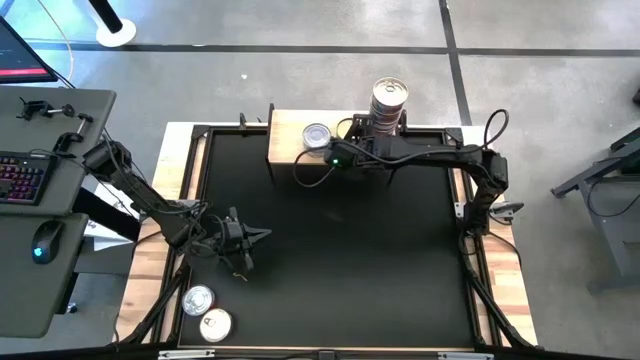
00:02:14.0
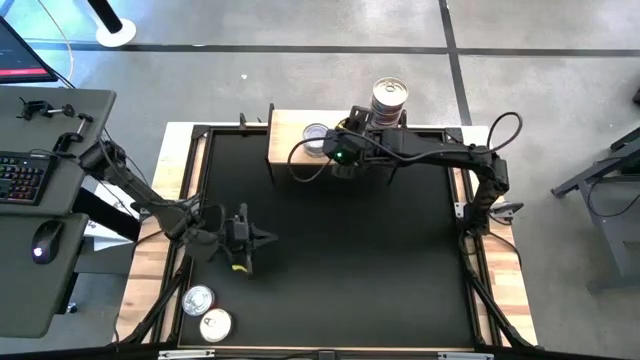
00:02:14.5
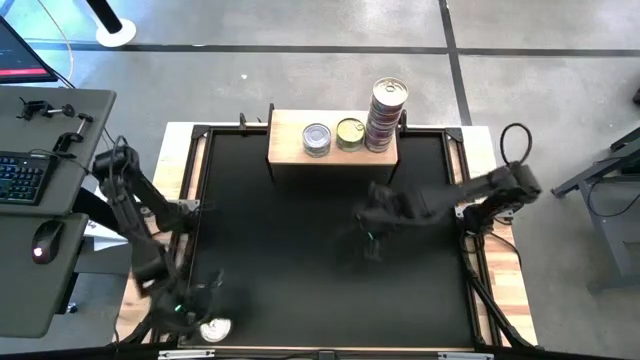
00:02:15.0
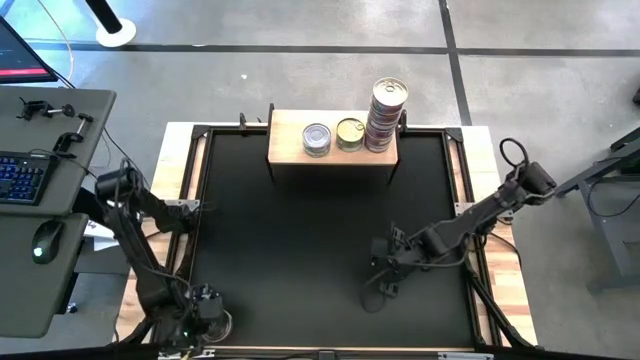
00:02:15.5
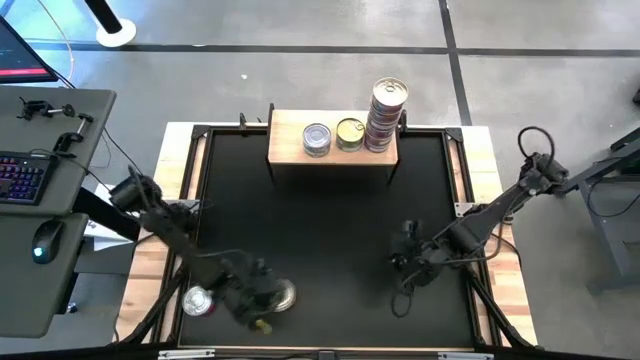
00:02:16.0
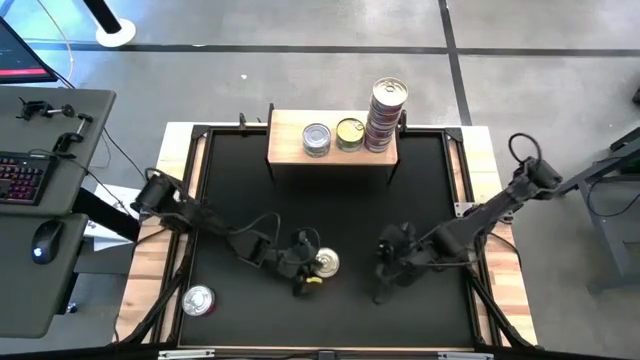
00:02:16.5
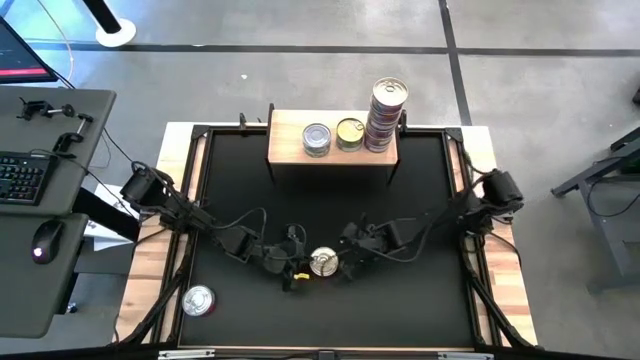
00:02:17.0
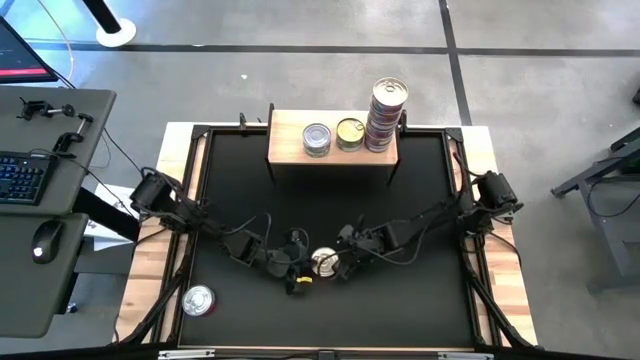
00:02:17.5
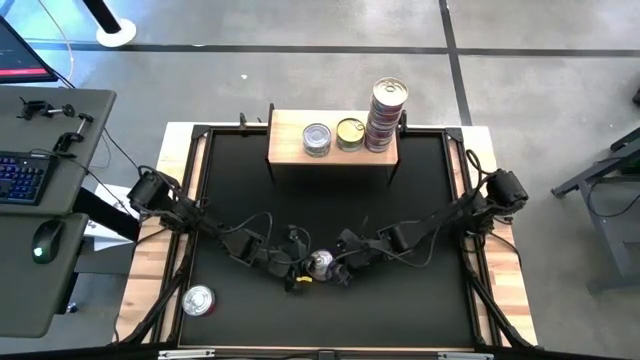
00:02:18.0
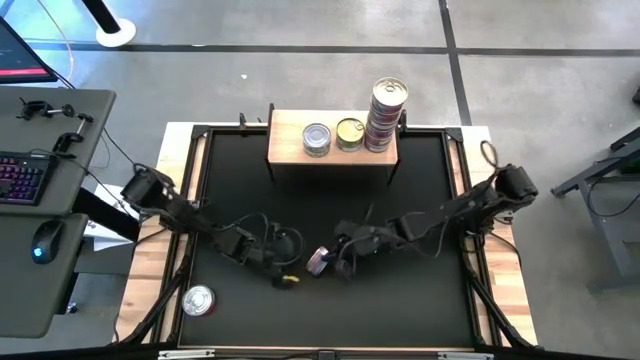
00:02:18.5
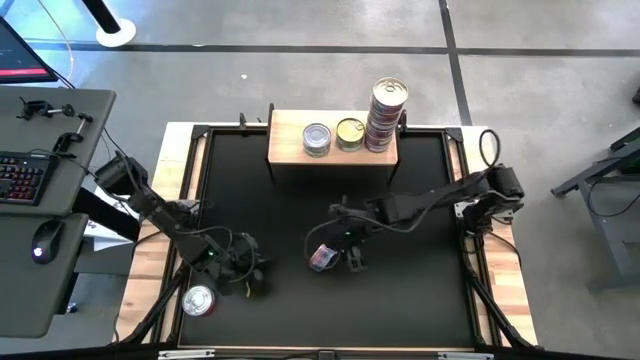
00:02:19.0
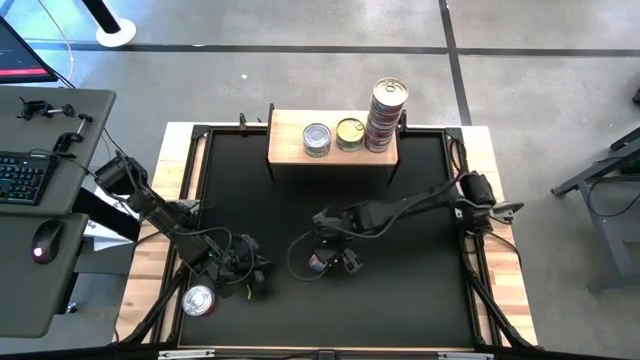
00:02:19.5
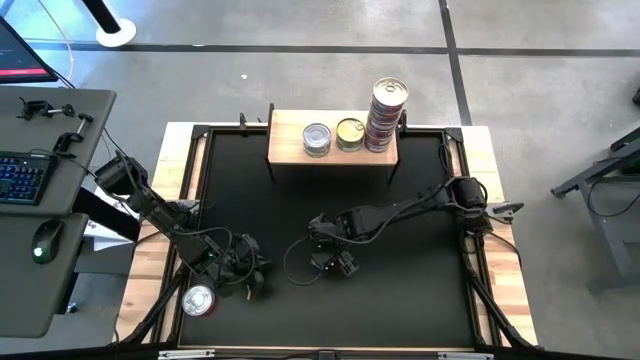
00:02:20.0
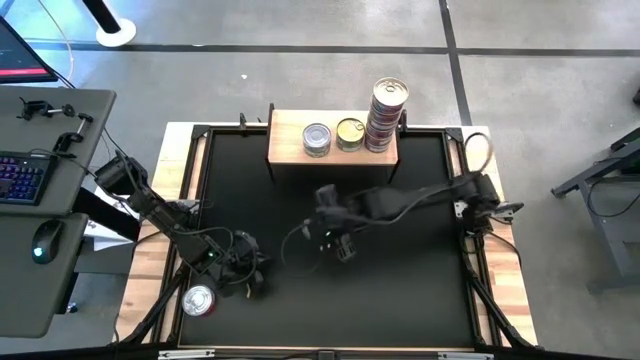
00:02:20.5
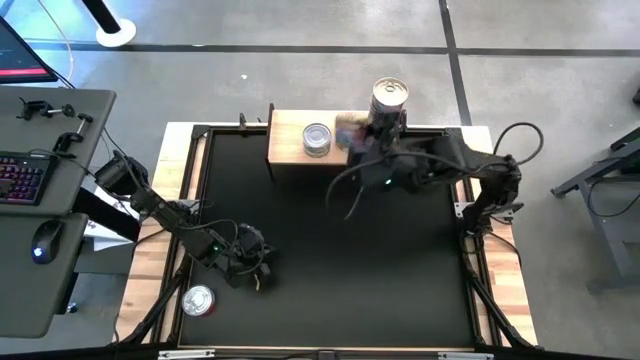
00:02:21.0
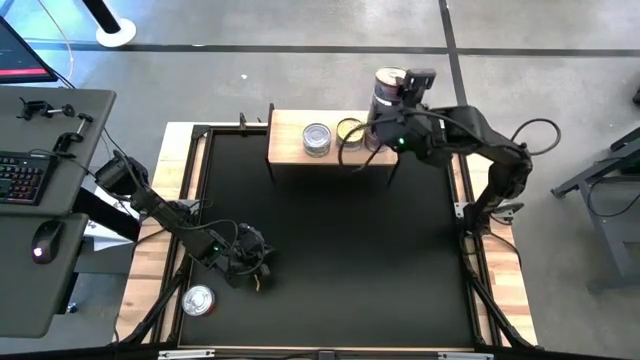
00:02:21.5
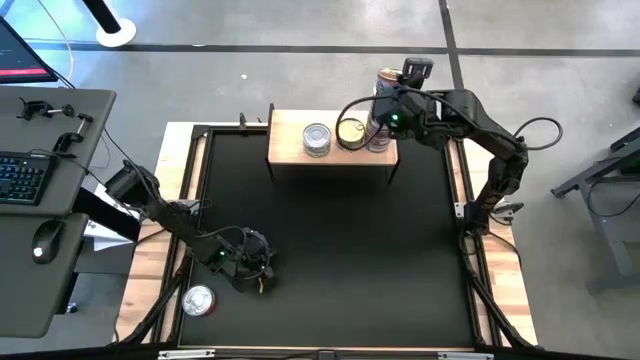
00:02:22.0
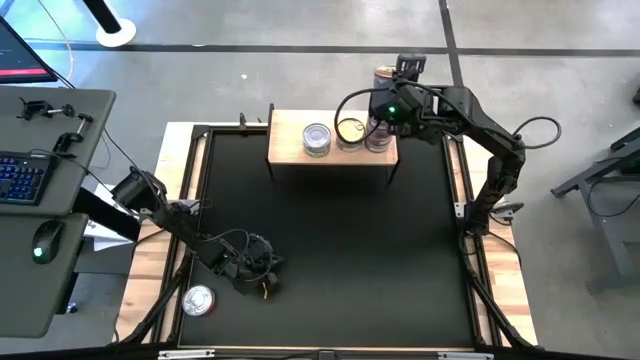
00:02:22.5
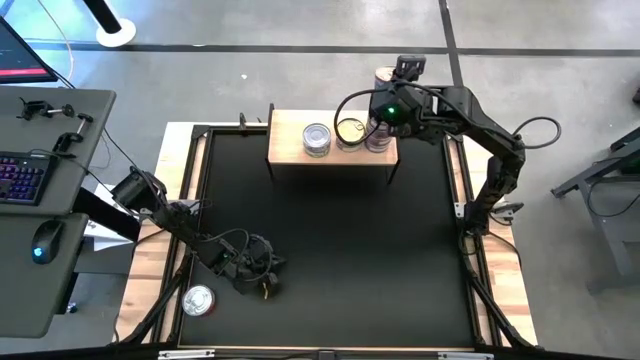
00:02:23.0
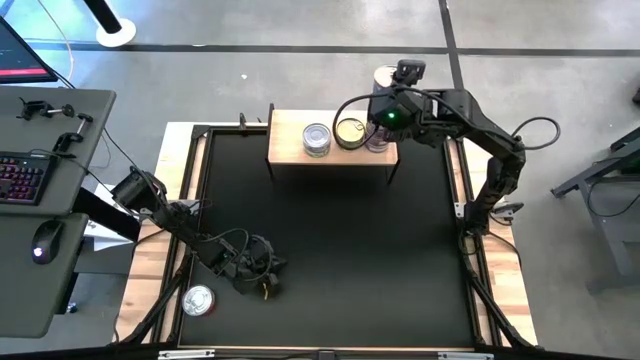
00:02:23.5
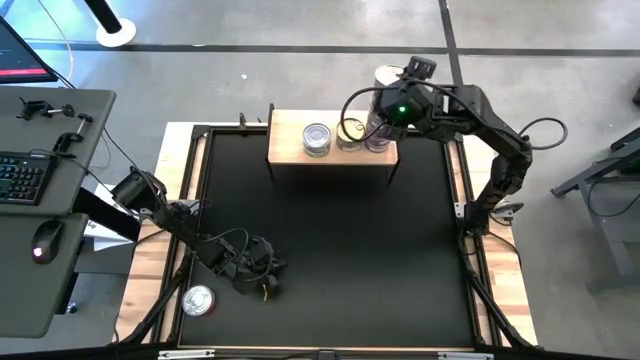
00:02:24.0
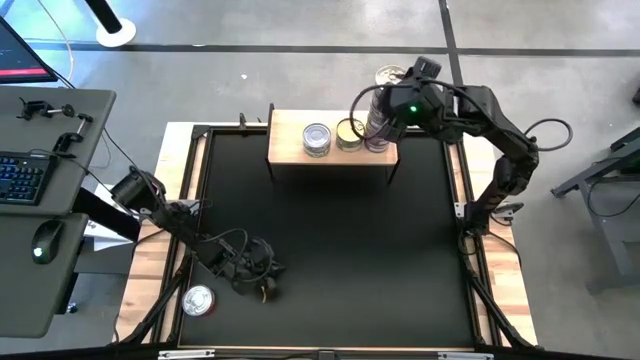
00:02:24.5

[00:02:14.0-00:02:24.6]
Task: Stack canned seafood by type on shelf
Stack the blue tuna can on top of the blue tuna can

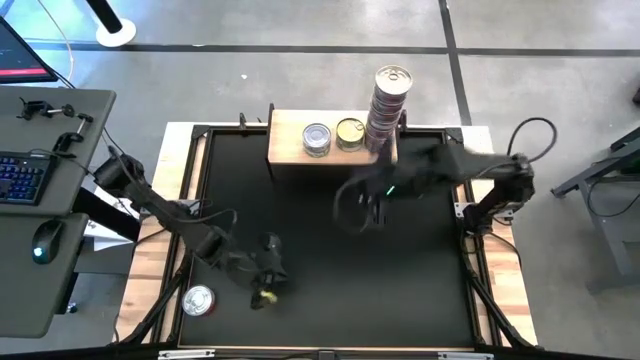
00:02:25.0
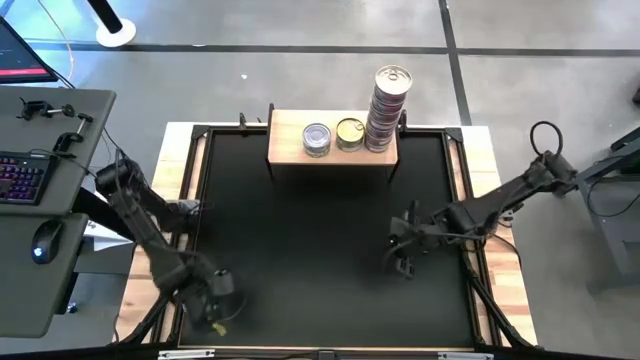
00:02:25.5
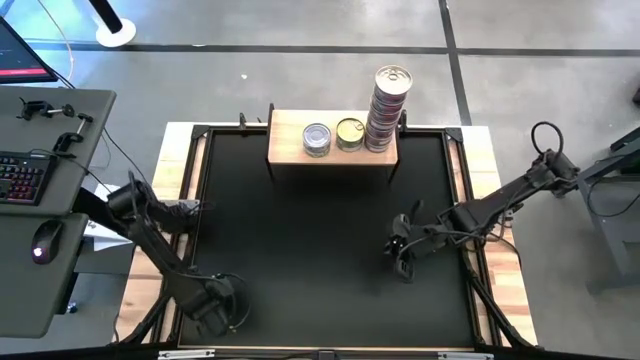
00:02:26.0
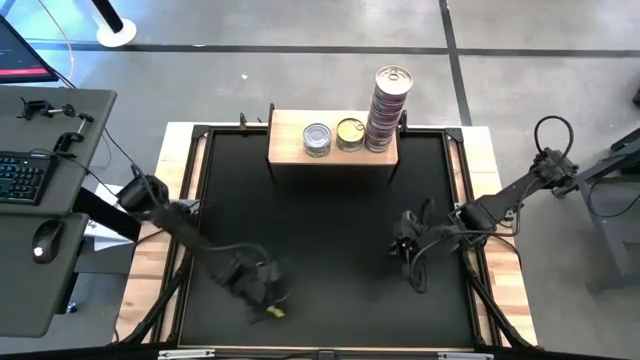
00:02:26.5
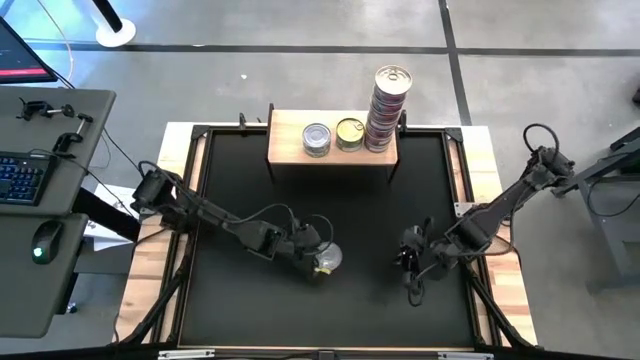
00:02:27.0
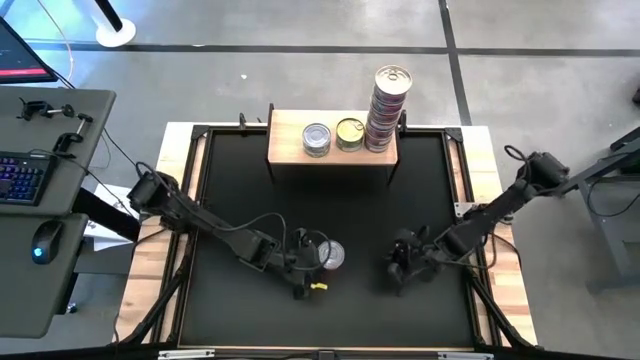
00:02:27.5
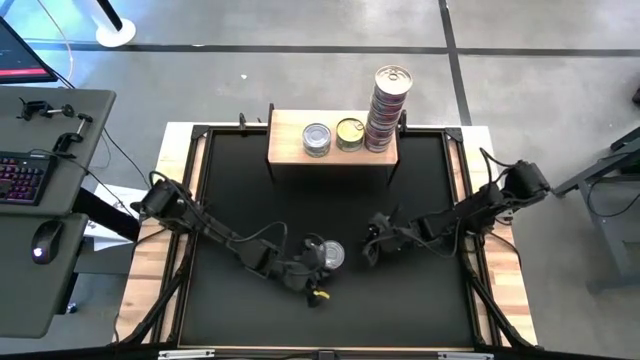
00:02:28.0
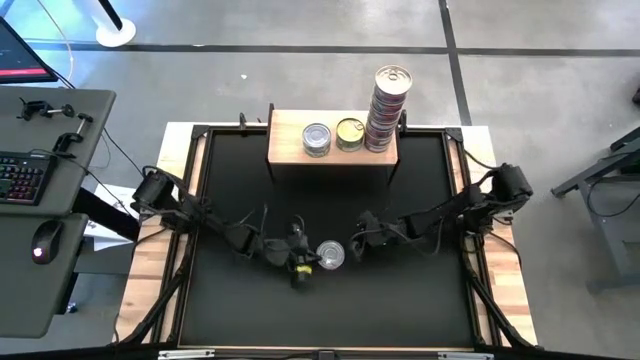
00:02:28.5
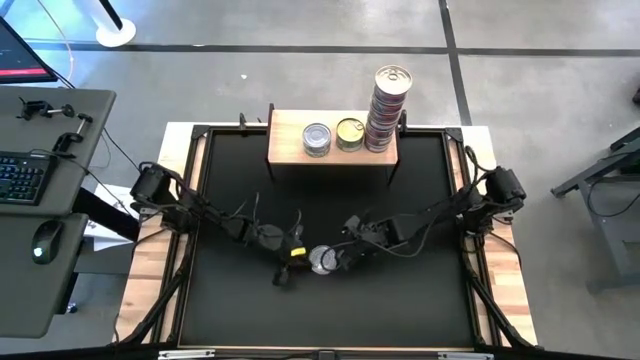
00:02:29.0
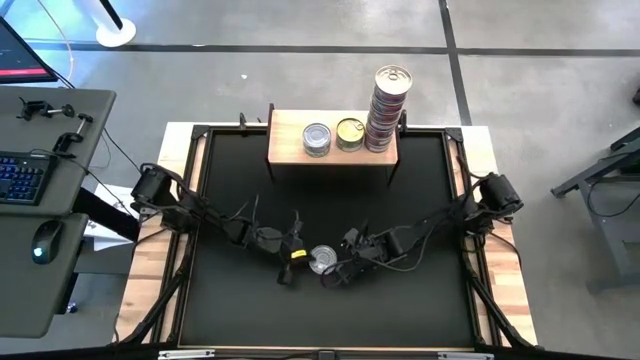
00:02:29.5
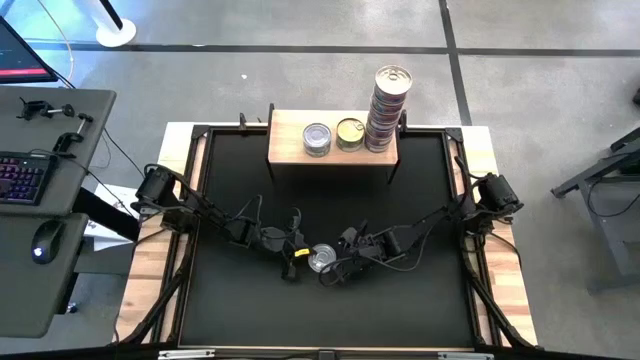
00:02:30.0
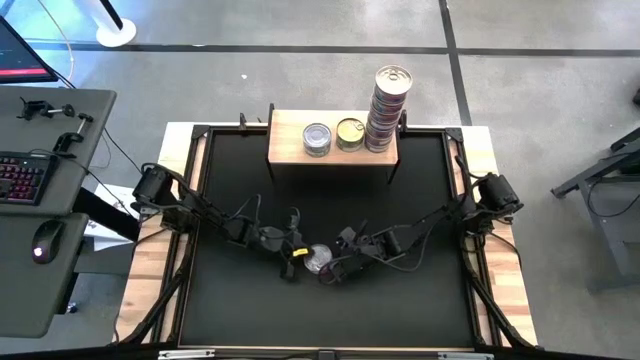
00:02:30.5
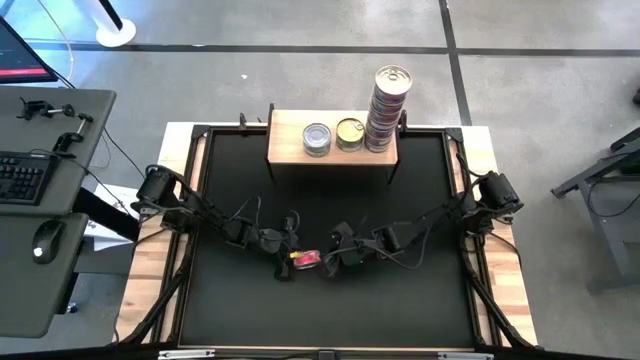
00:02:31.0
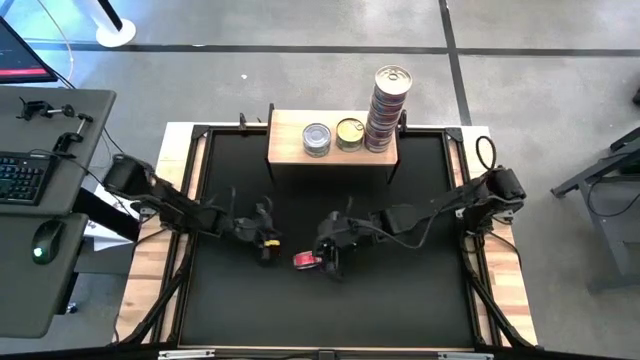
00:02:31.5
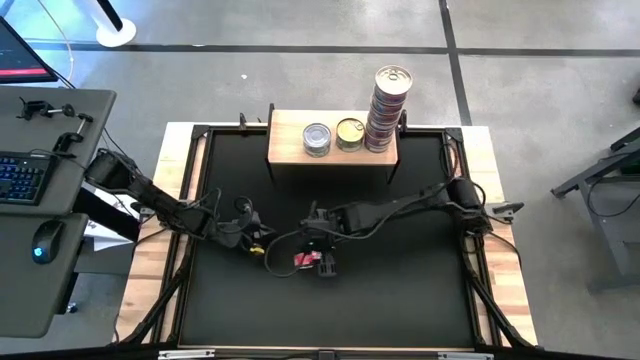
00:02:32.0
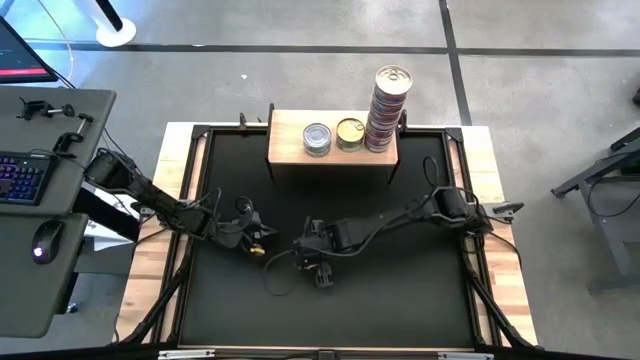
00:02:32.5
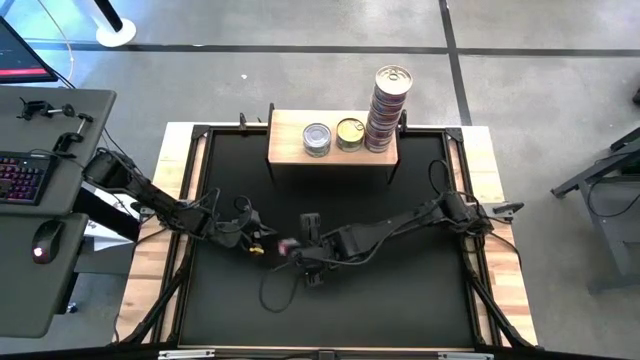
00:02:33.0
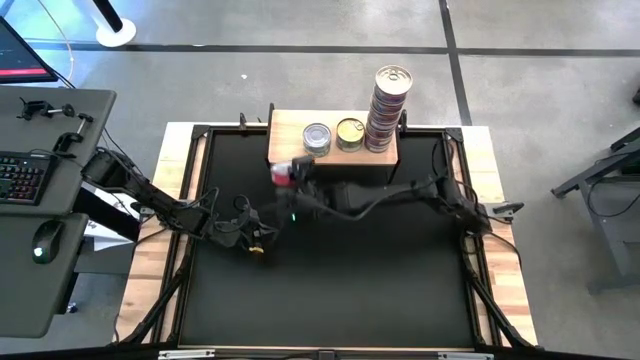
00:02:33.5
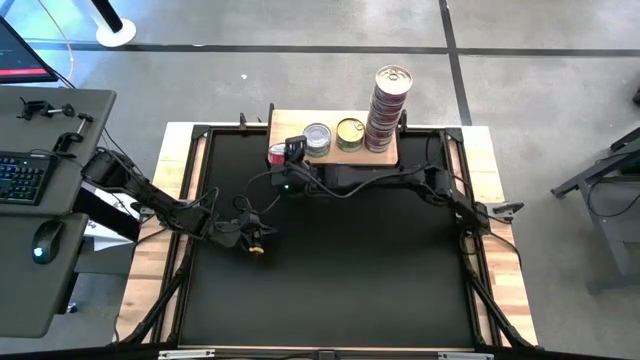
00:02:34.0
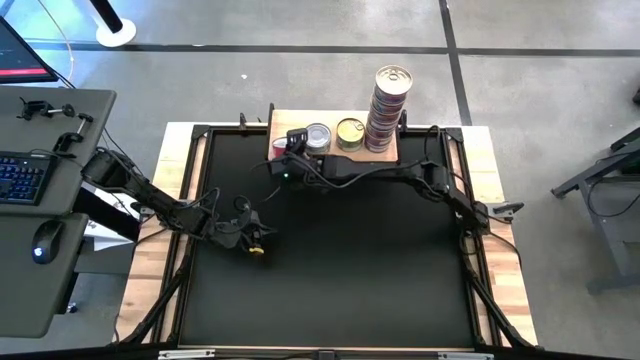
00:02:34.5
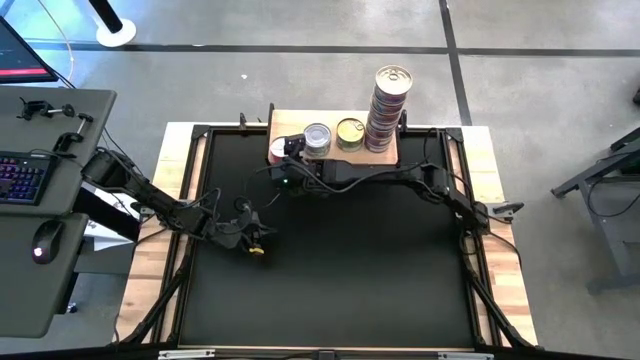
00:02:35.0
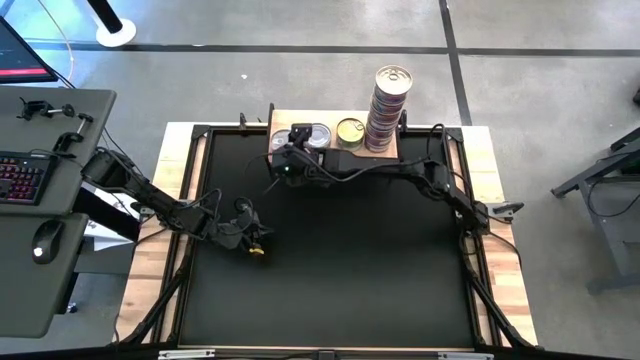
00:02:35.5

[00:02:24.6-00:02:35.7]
Put the red tuna can on the shelf
